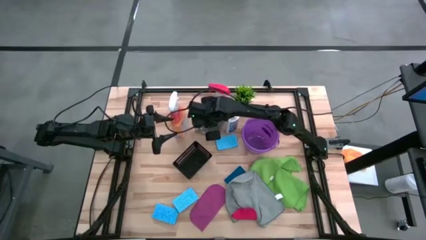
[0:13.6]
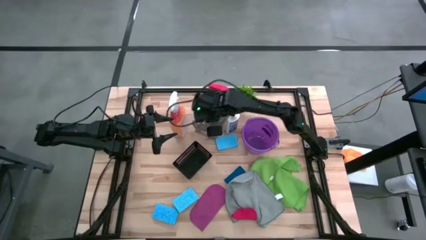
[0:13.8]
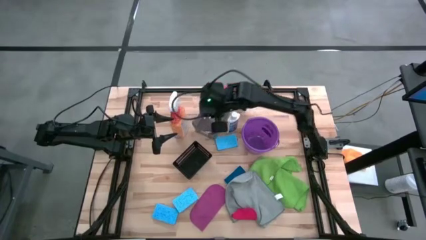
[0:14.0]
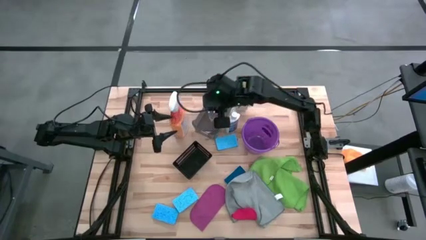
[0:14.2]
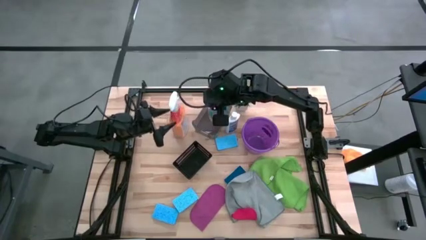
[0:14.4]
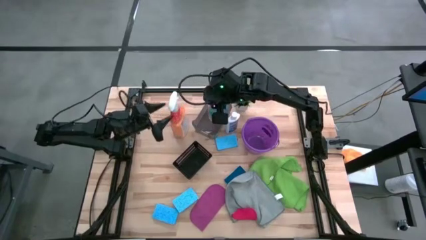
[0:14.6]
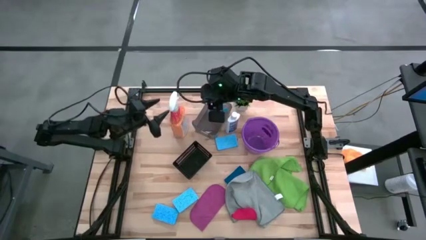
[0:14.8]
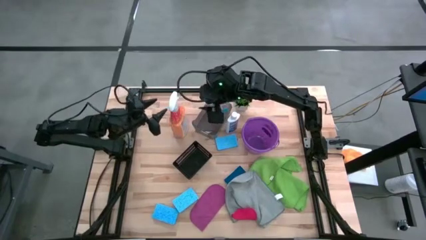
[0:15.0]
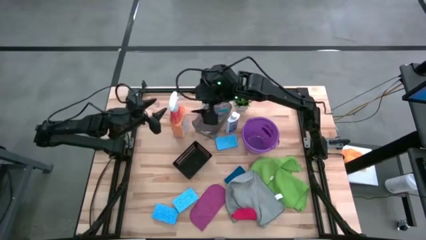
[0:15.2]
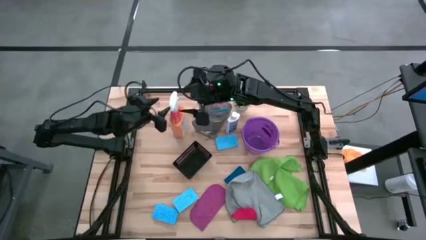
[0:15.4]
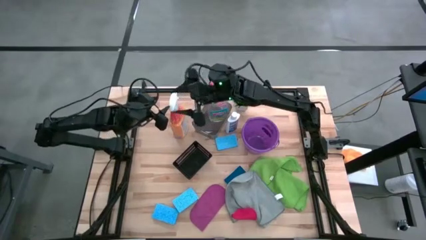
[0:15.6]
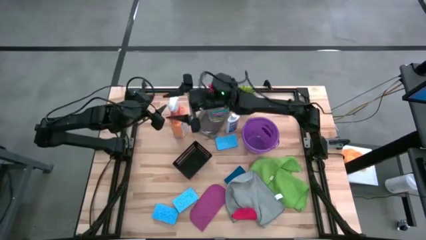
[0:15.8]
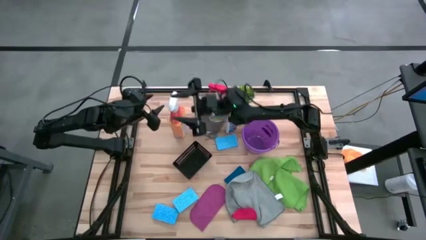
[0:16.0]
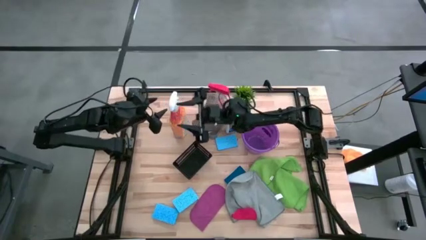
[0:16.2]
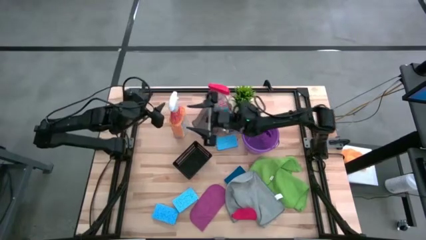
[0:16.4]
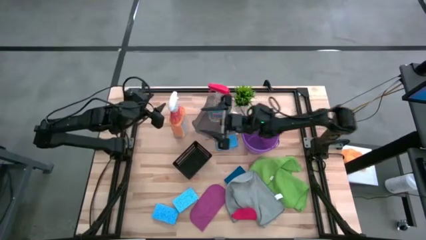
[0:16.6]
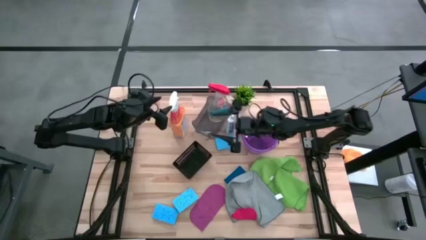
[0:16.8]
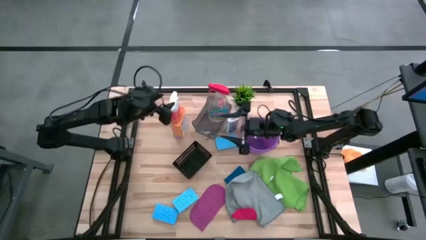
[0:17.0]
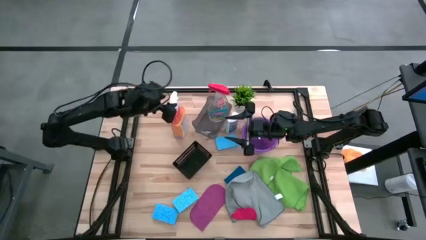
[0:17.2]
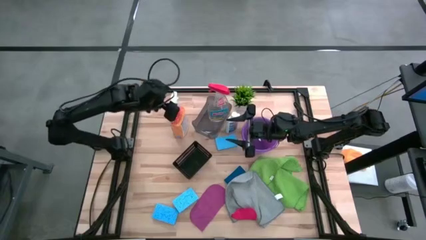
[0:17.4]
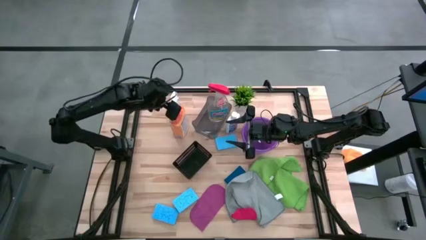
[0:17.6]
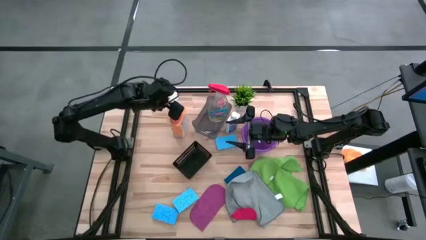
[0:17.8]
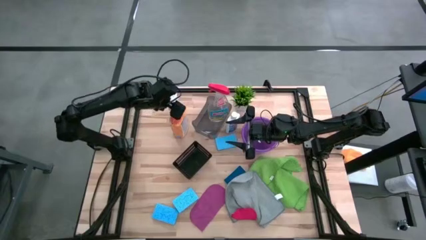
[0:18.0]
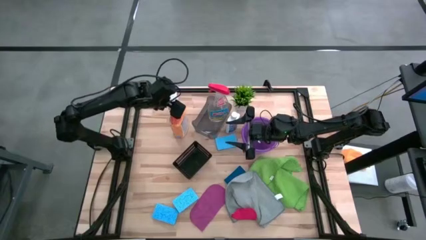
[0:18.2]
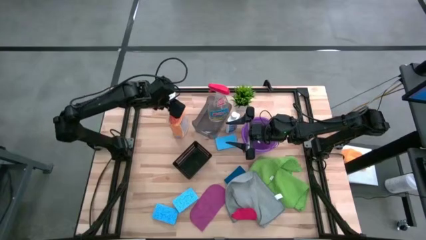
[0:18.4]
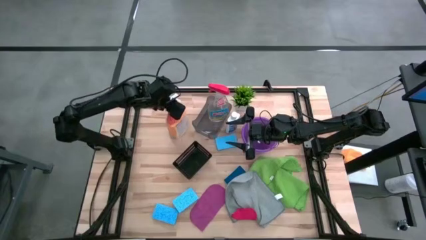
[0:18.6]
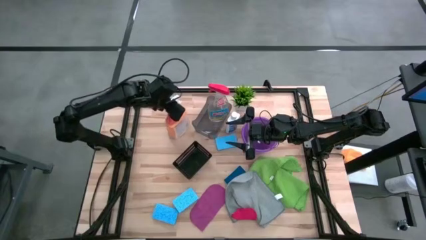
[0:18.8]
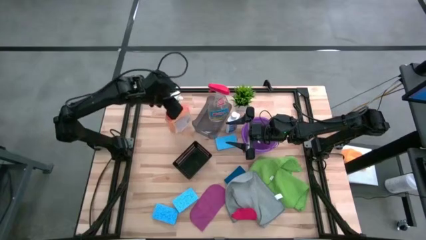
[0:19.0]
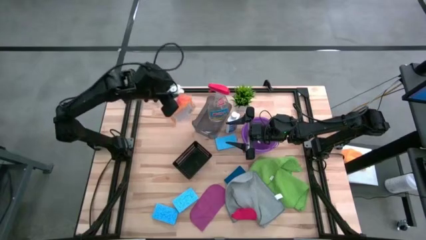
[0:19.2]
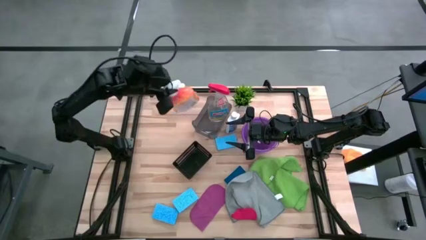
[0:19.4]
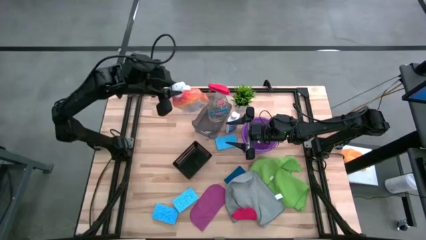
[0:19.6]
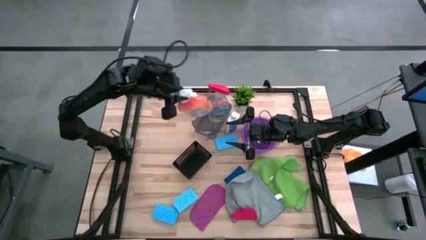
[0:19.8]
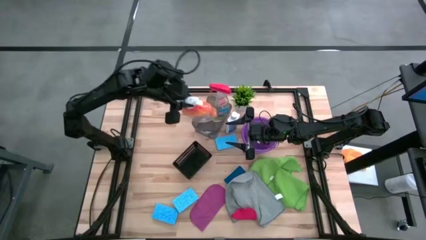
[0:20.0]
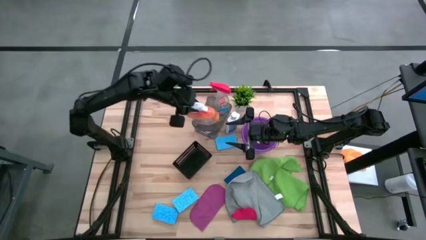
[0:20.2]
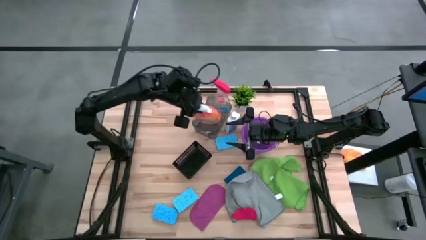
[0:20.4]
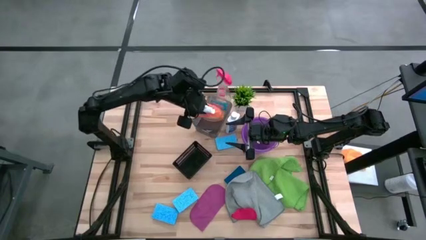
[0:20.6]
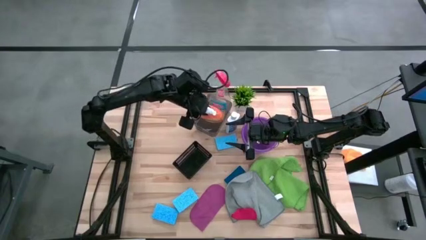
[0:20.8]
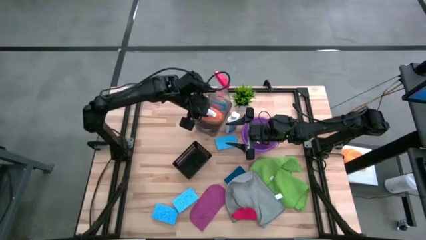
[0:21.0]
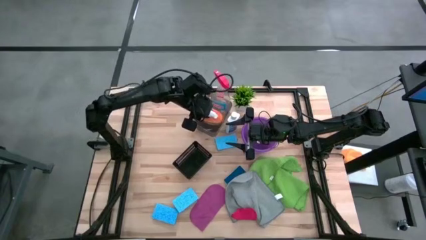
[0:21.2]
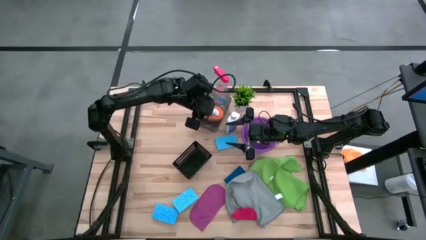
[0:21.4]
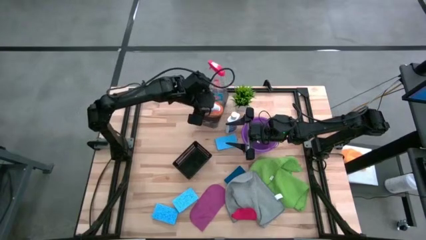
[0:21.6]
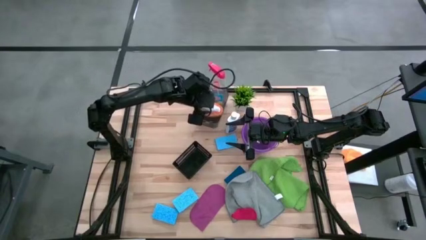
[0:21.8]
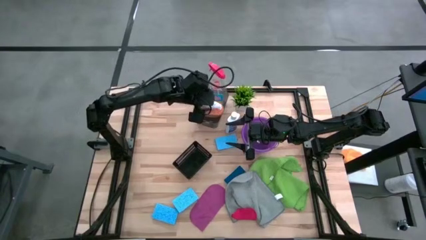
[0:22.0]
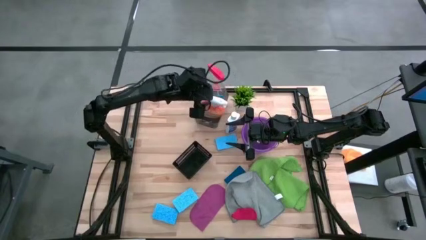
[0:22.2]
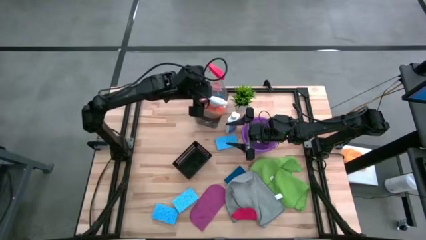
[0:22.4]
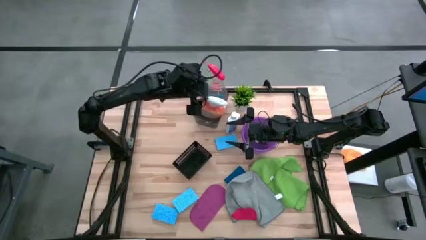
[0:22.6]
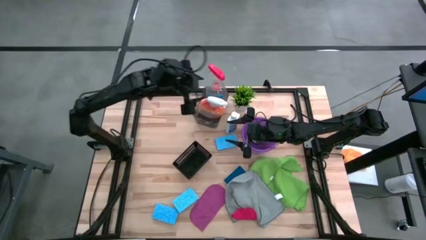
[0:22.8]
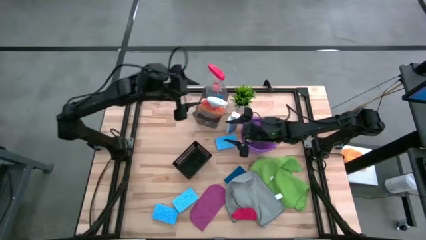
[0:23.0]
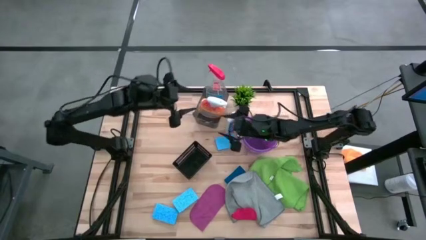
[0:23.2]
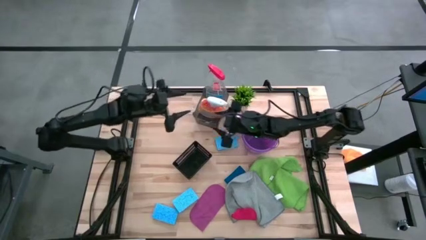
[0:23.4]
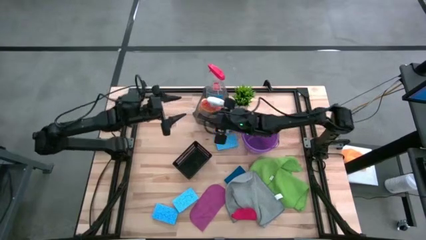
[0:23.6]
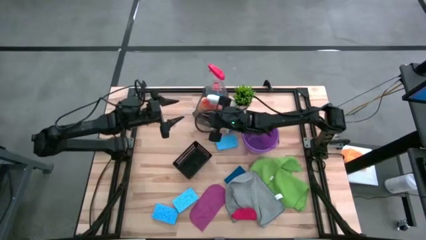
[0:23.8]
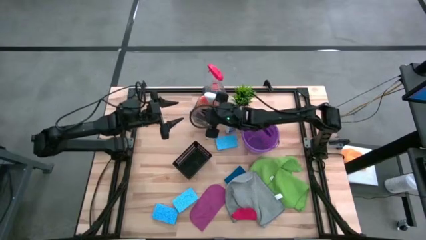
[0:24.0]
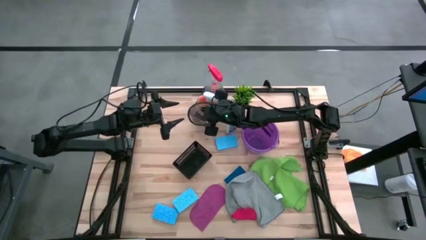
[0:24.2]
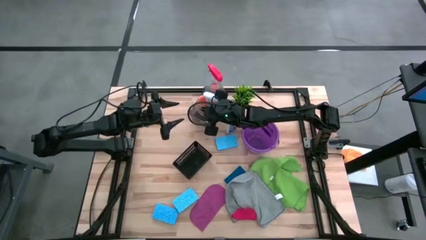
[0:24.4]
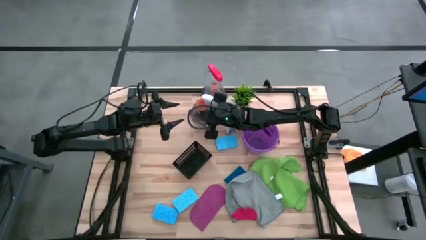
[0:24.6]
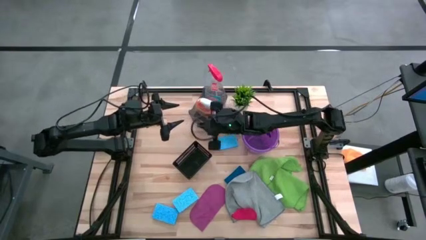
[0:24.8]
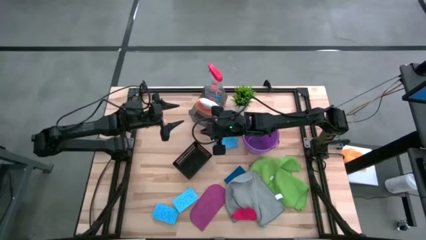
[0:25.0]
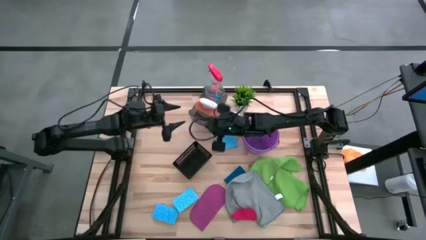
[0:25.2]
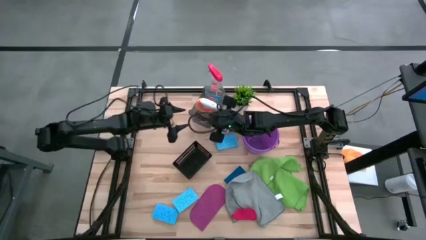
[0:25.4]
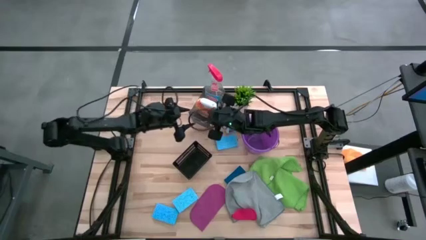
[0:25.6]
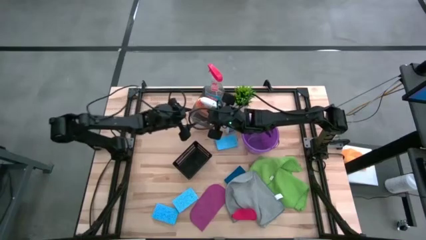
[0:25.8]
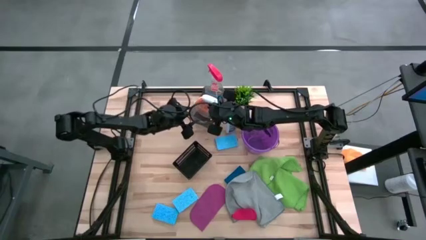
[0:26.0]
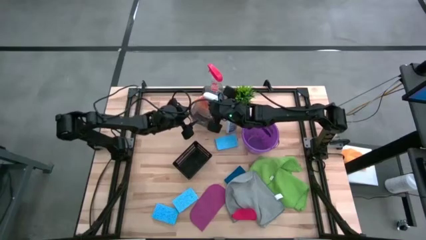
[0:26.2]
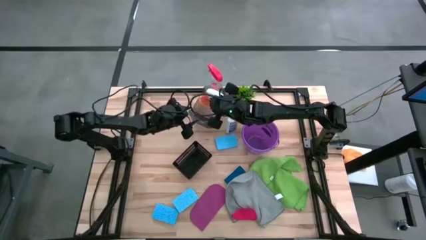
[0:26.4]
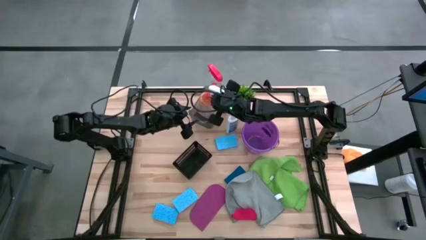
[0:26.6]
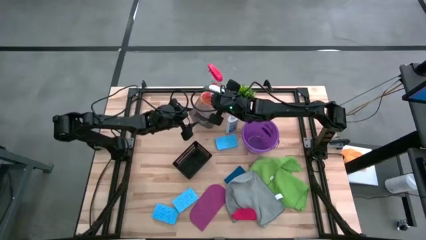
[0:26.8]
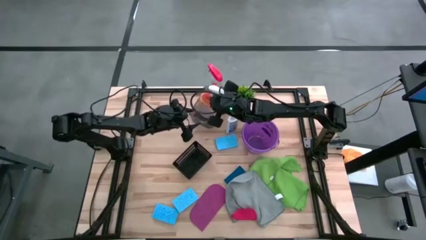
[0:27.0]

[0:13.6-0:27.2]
Task: Pick & Place Kitchen Items
Put the orange spray bottle into the black bin
